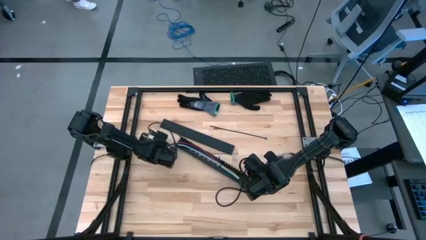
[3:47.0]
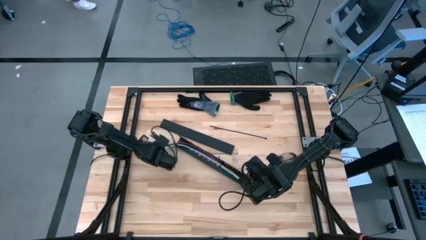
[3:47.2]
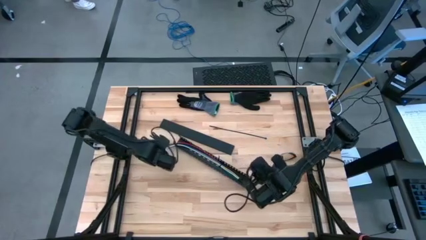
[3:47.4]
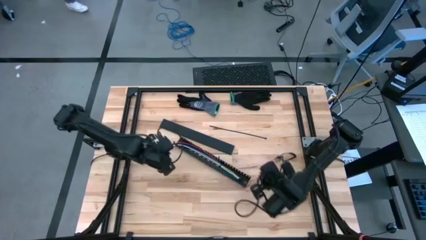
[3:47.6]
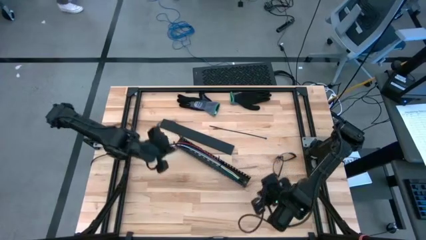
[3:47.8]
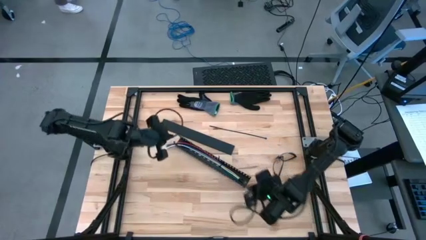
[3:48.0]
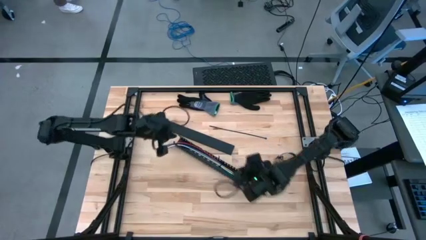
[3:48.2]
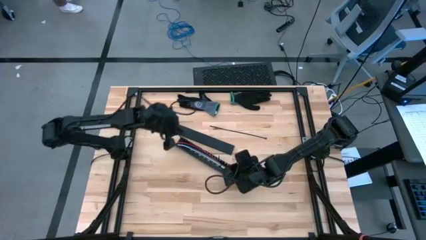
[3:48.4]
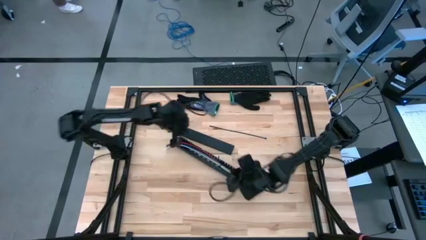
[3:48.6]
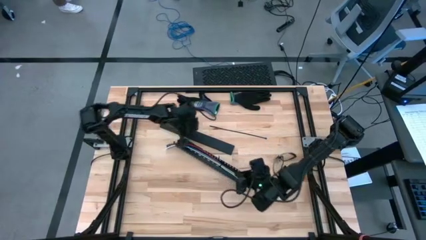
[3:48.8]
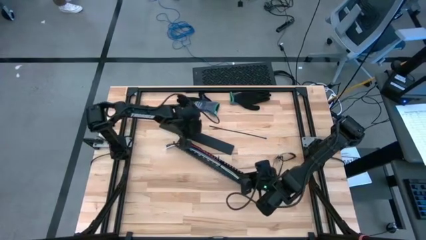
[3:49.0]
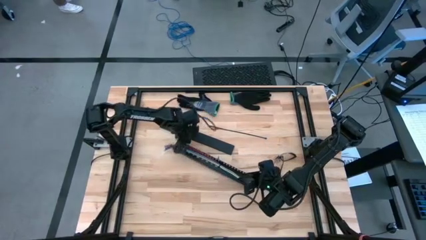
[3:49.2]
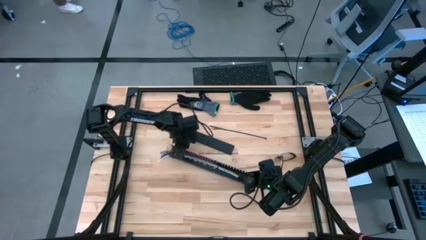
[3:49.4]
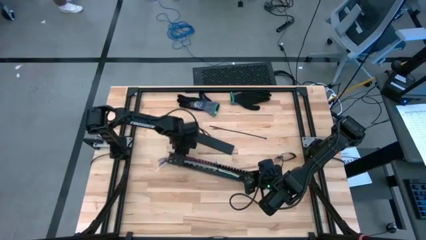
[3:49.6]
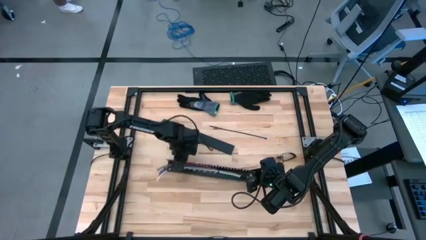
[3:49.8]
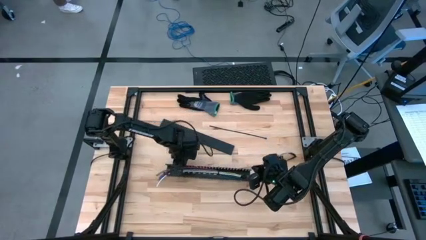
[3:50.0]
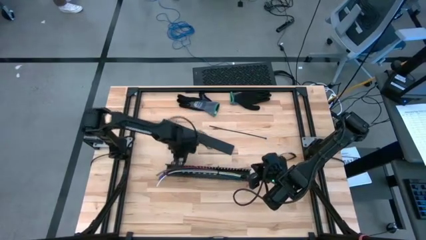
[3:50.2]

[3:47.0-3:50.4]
Task: Ziptie cables
Adjust the black cable duct

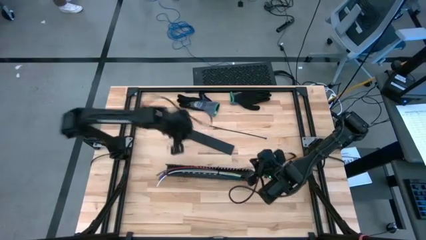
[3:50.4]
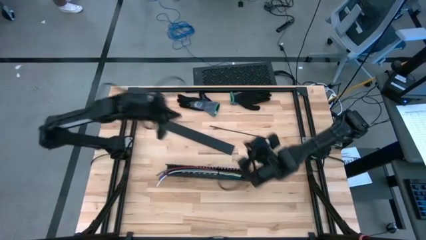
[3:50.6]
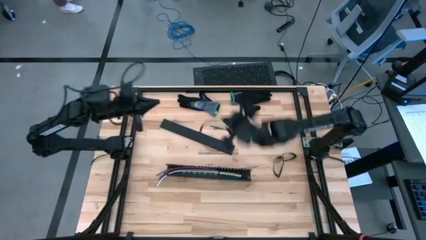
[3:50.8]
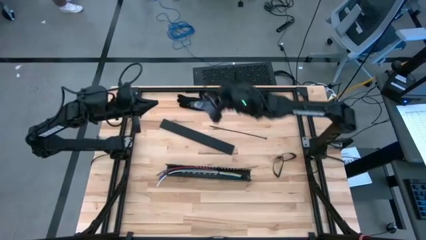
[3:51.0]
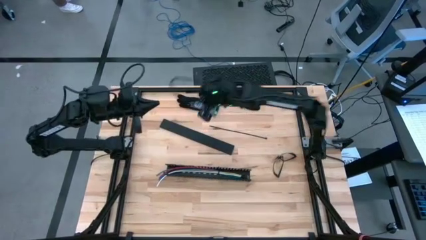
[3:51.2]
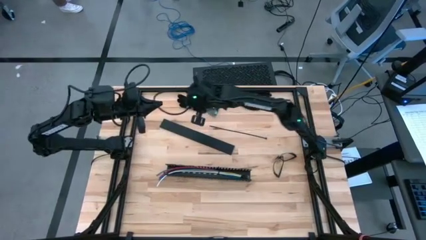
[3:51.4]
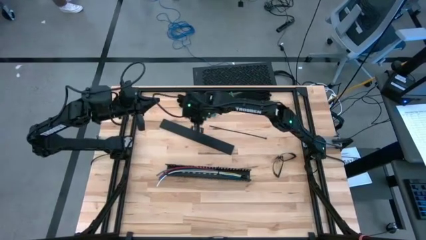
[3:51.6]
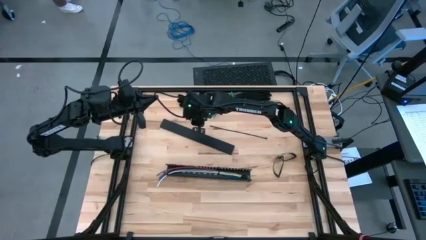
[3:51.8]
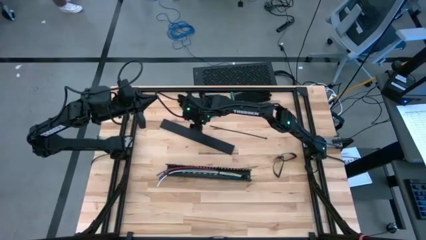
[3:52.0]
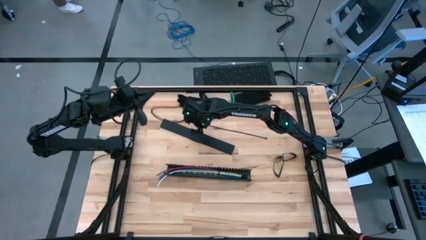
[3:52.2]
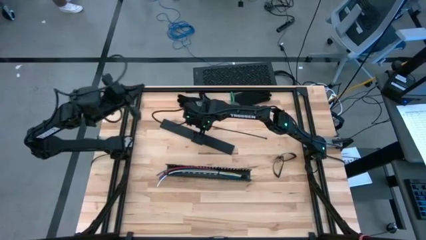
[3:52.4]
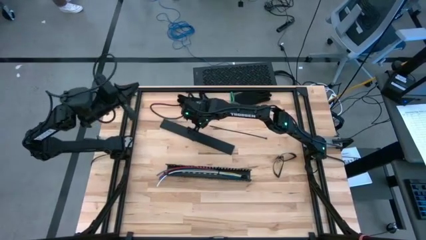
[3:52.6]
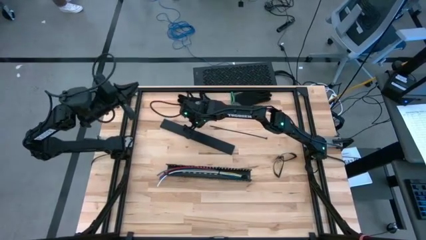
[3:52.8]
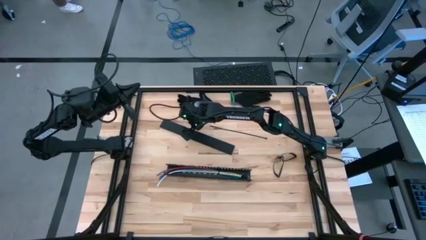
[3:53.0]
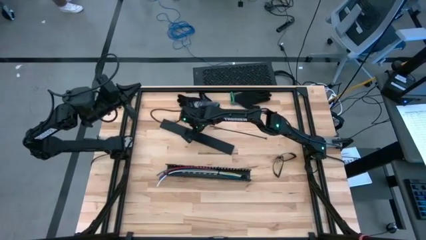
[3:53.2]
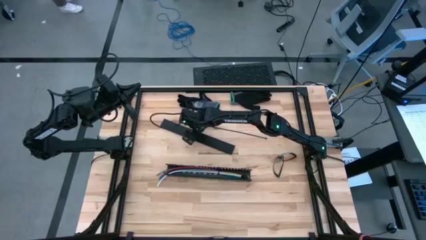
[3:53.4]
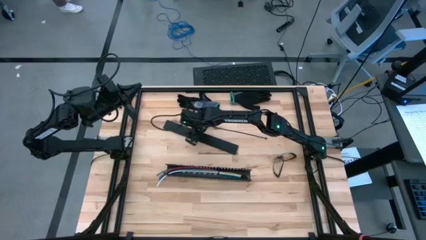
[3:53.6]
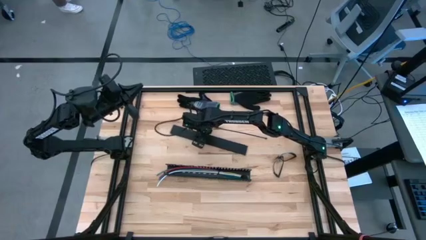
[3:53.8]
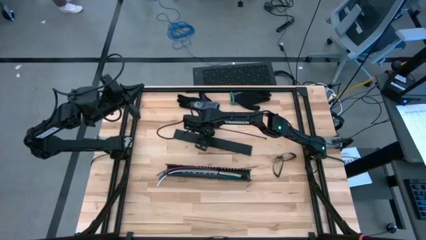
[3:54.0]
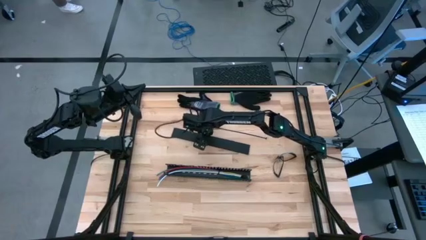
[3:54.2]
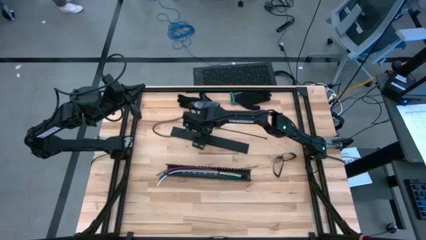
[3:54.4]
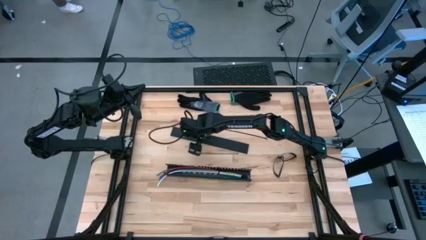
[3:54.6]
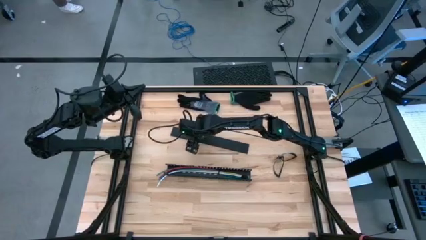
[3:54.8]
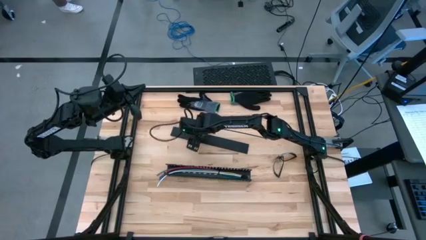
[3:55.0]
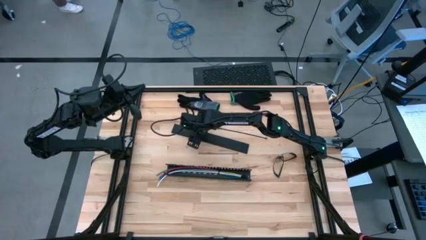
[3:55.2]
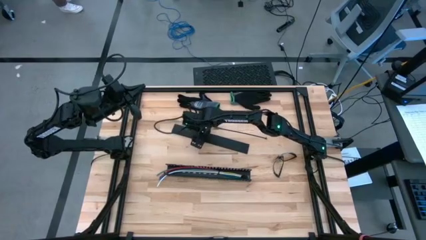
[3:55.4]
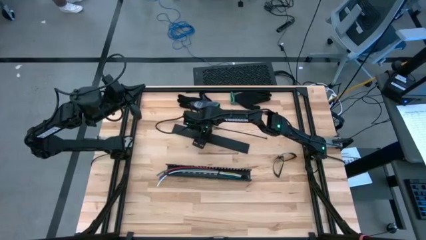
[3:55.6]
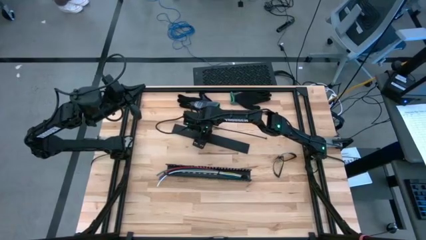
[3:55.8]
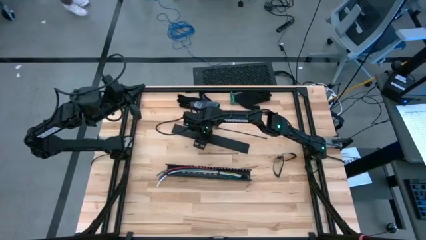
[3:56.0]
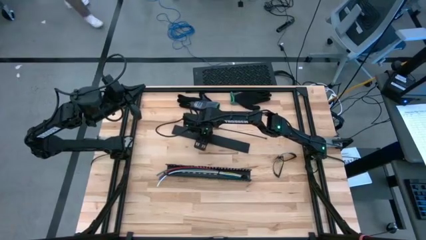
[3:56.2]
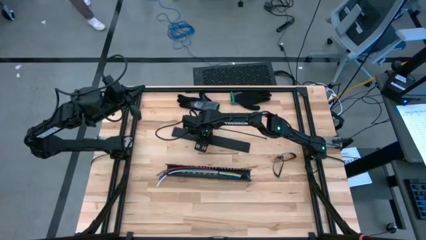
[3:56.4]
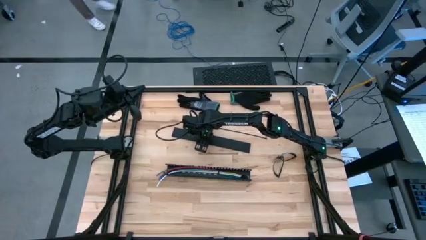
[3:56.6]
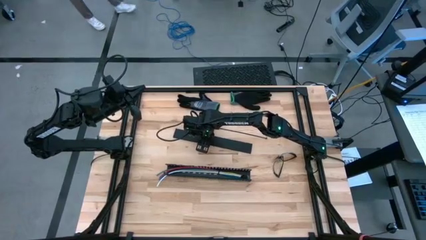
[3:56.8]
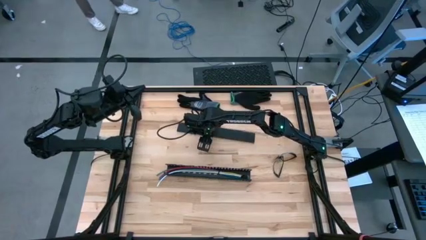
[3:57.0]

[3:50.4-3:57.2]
Close the black cable duct
